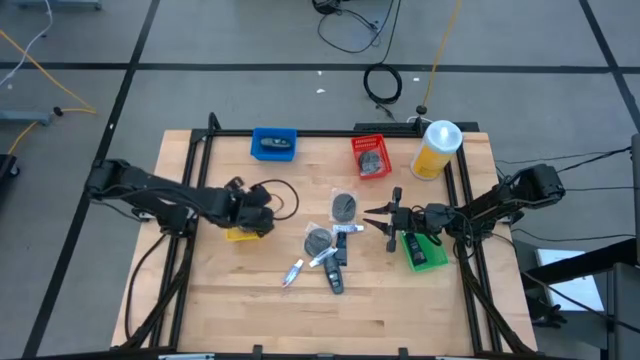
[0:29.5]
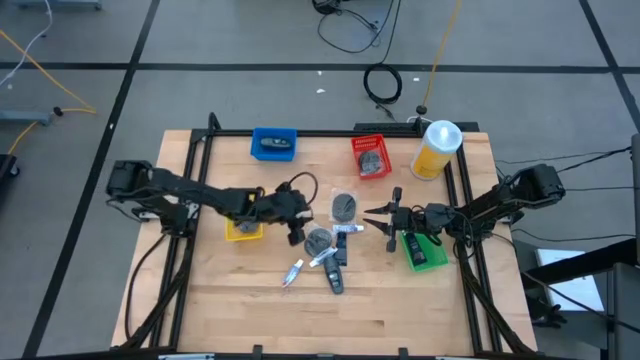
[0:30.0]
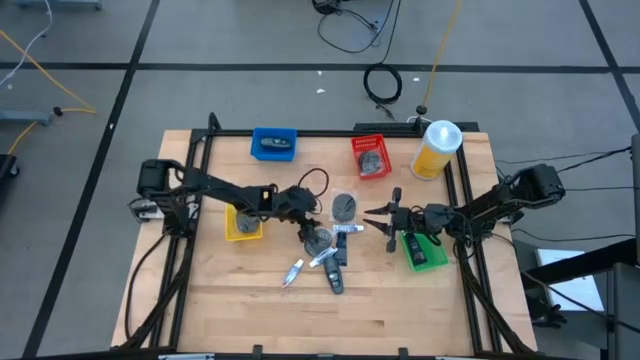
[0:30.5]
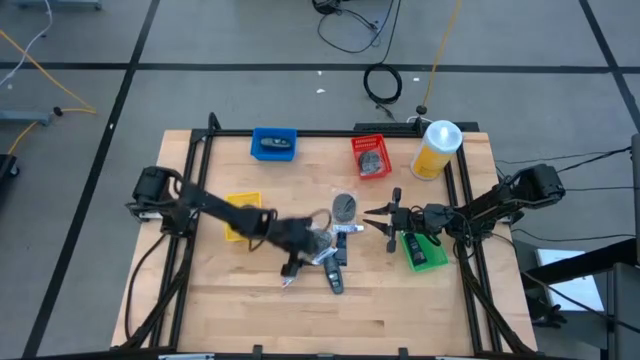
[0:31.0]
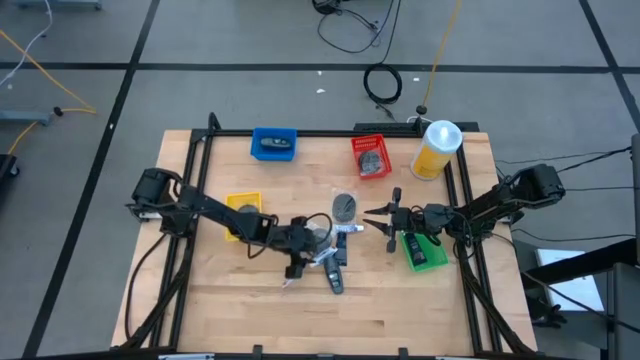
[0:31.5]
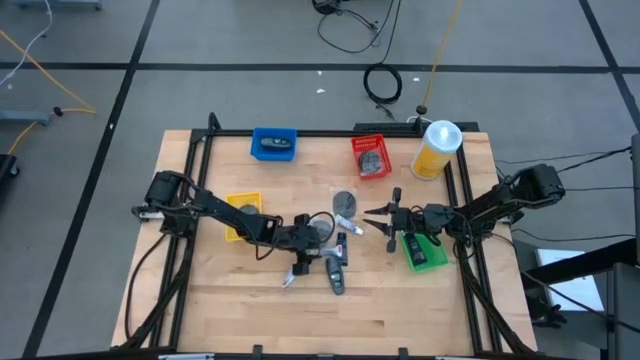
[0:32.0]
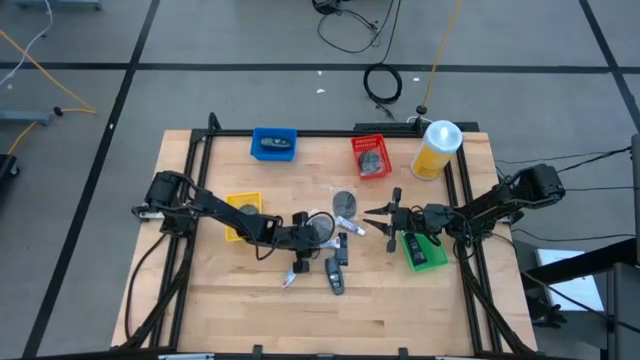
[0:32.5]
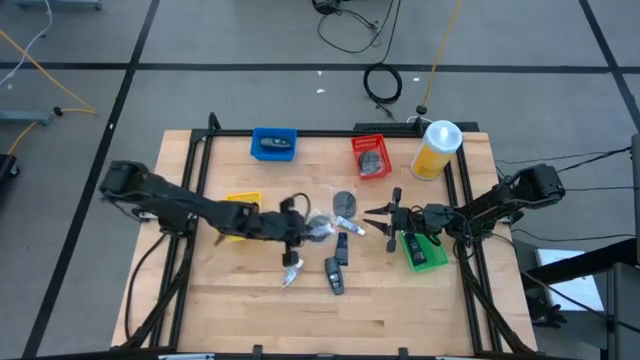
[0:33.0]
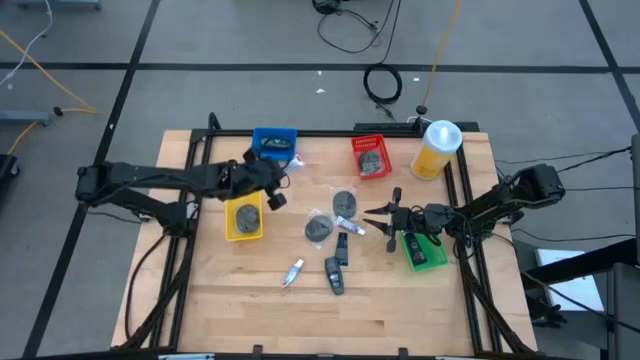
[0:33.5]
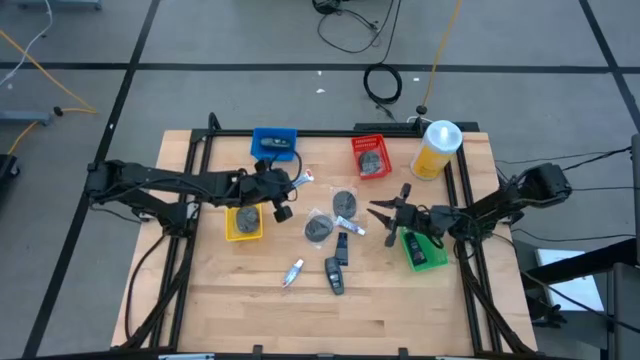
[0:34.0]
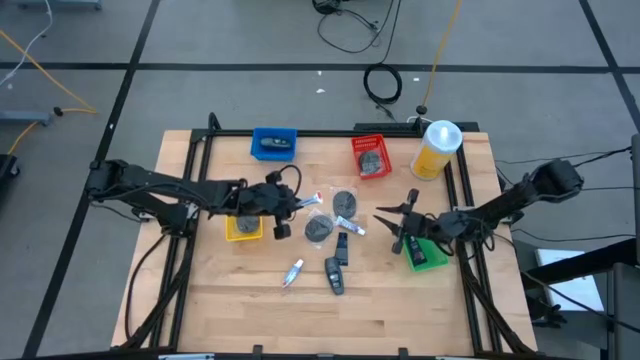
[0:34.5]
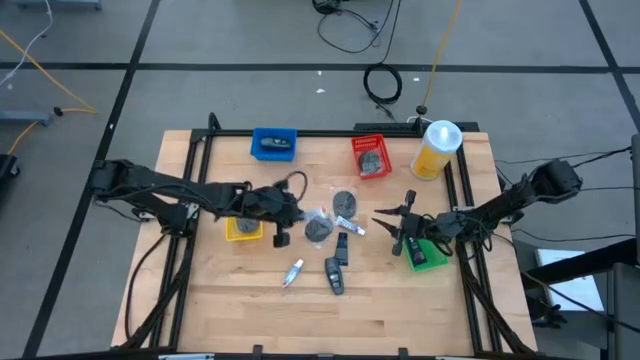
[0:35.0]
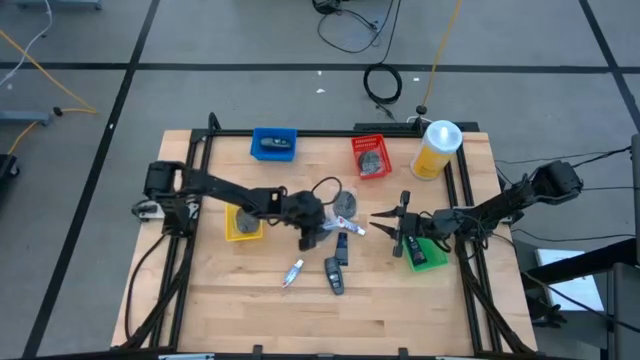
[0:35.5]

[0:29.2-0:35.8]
Task: Pick & Place Travel size toiletries
Put the white toothpaste into the red bin

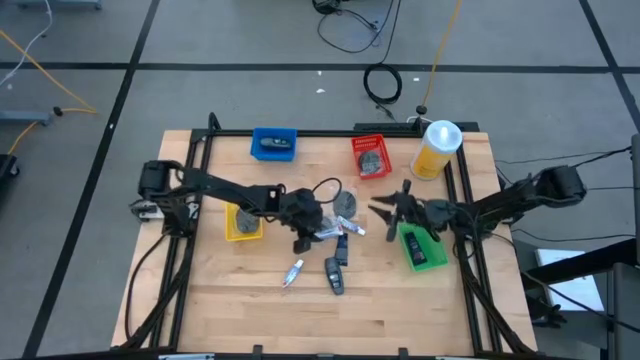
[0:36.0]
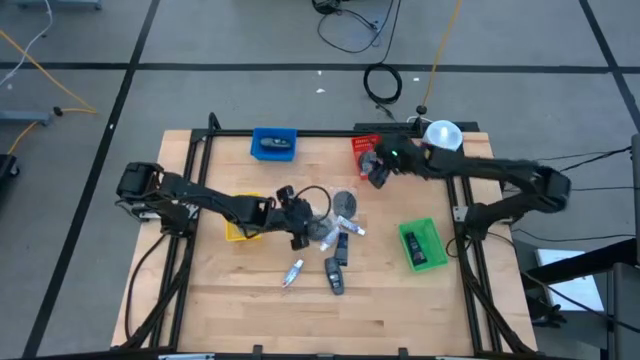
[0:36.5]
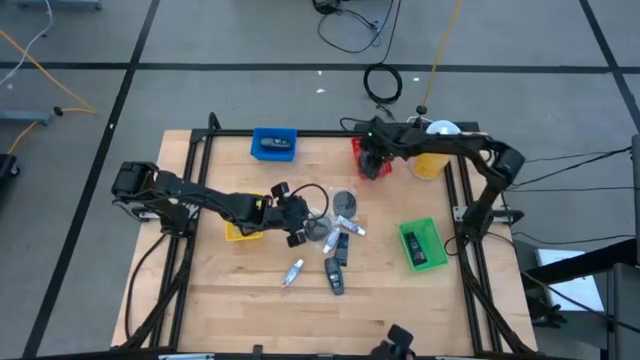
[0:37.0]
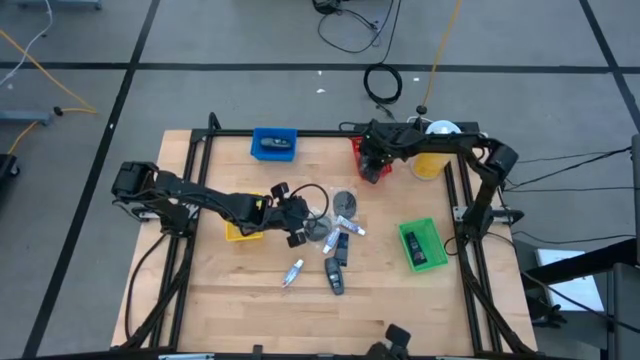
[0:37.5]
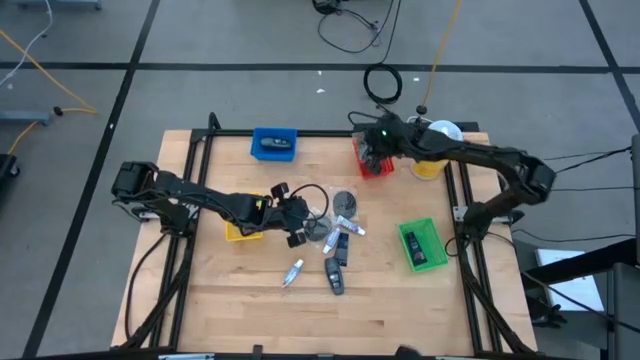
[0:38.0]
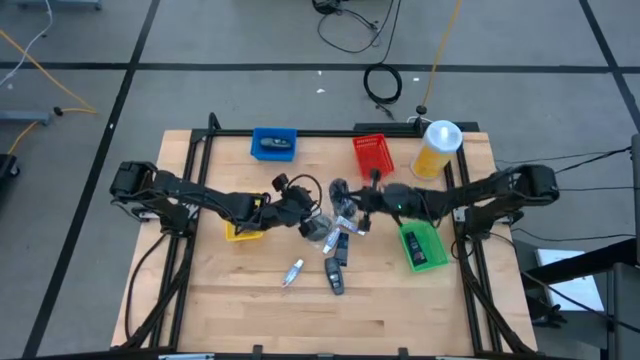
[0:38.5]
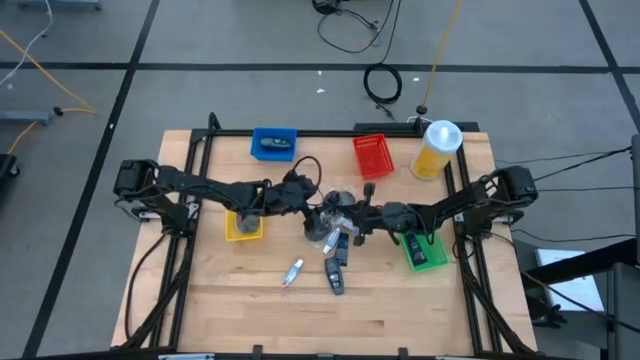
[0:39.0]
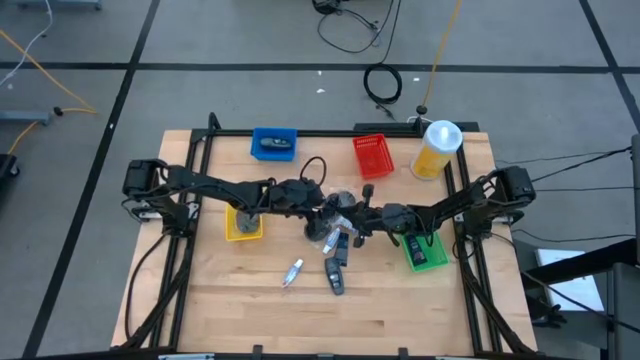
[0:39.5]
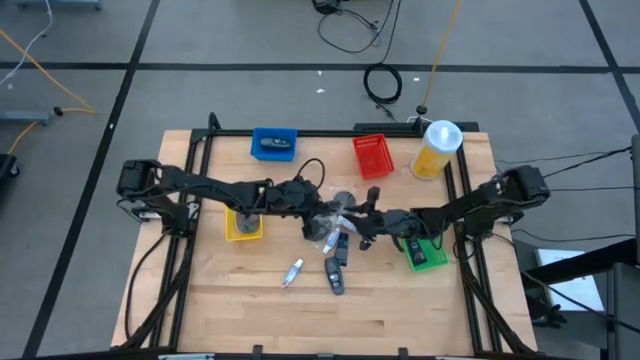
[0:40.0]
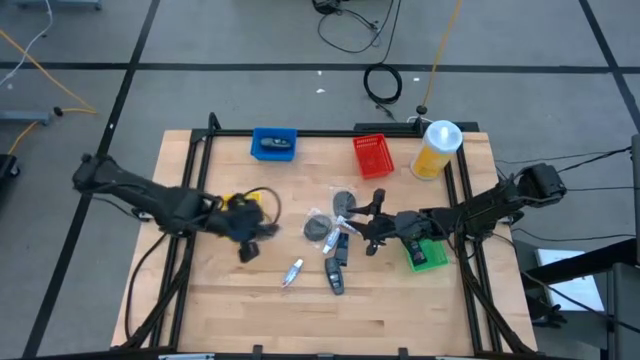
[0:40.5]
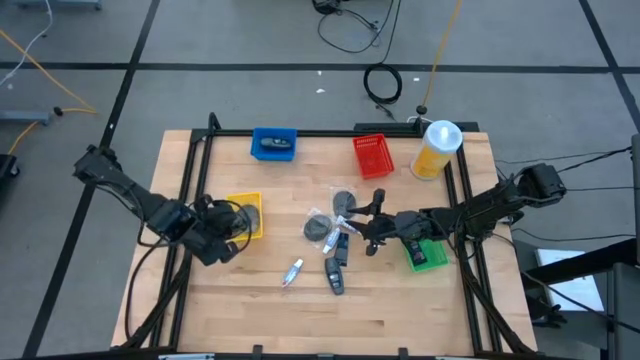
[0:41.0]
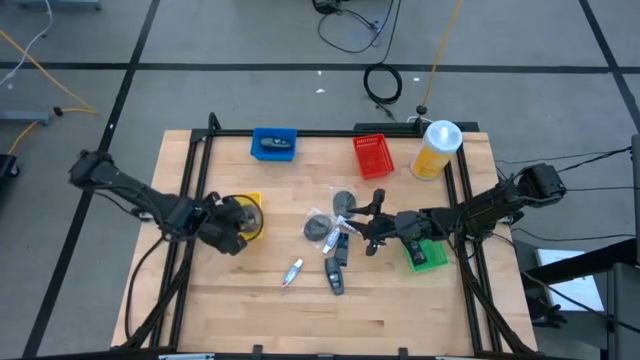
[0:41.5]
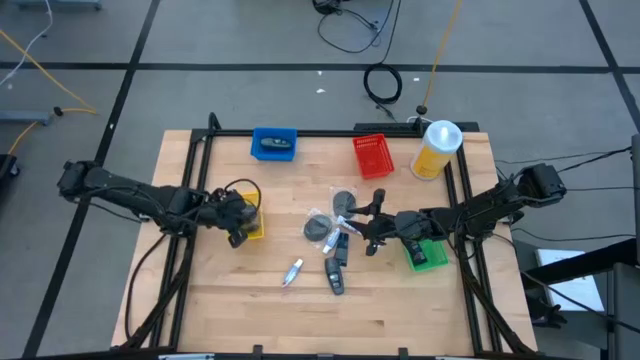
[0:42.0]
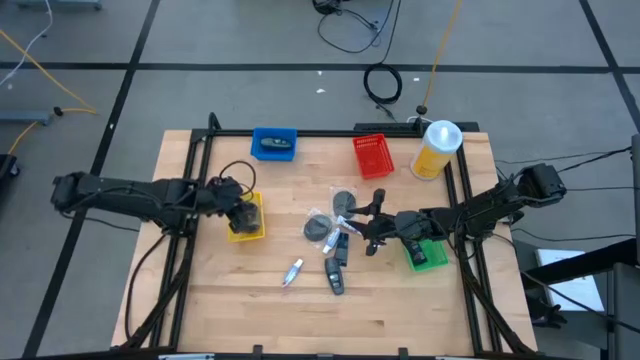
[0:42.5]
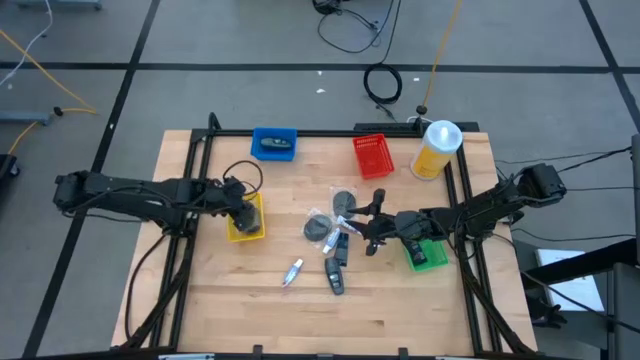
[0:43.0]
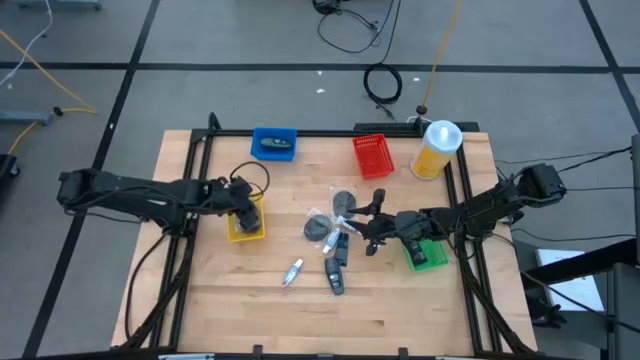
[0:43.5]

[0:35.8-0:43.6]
Put the black hairbrush into the yellow bin

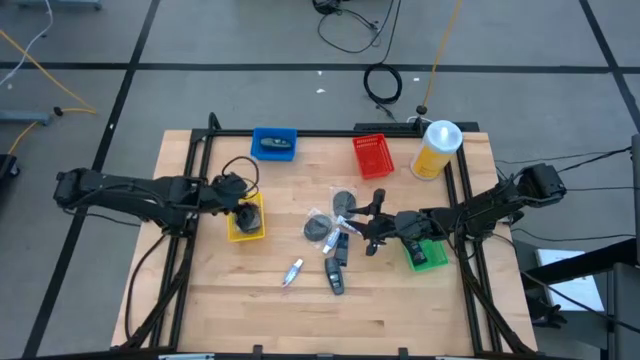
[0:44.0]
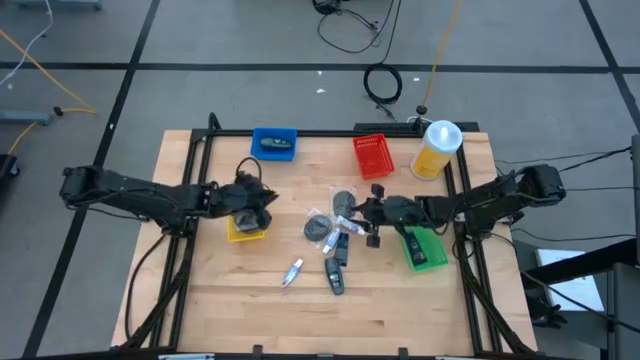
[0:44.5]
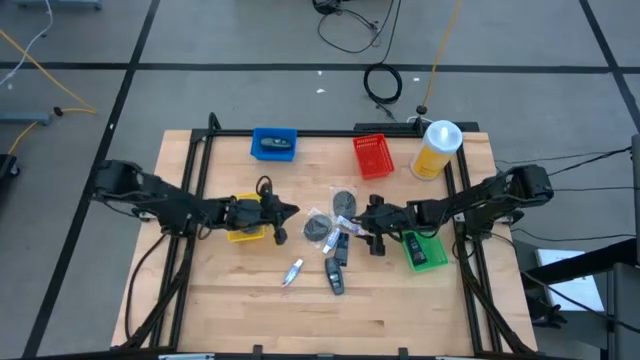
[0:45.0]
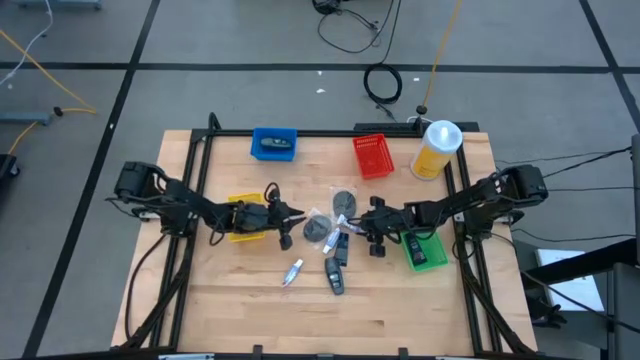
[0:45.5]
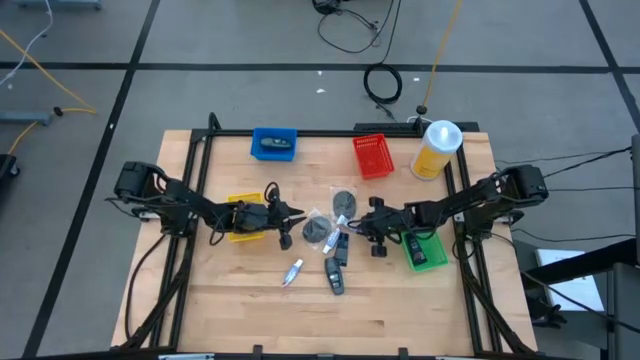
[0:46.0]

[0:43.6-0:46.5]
Put the white toothpaste into the red bin

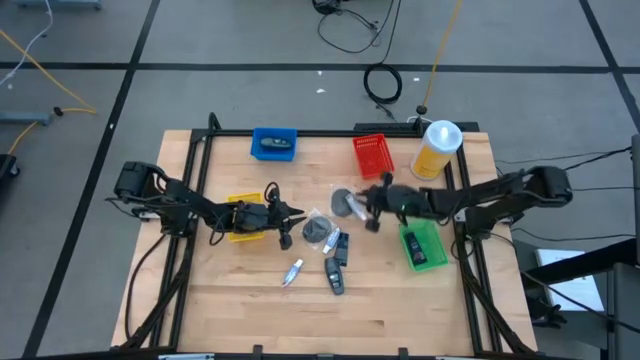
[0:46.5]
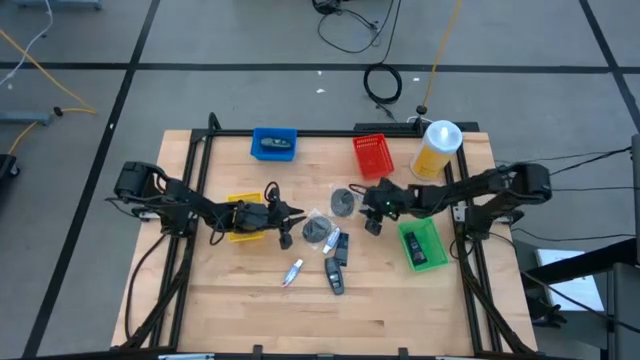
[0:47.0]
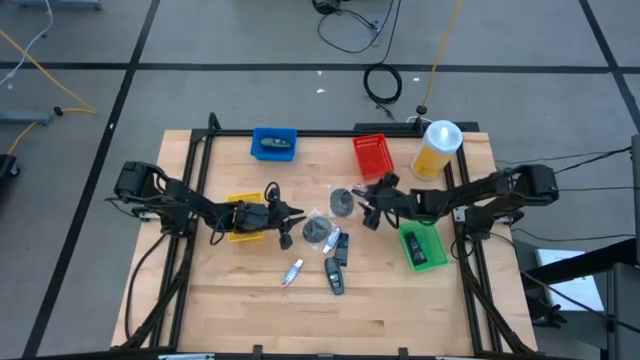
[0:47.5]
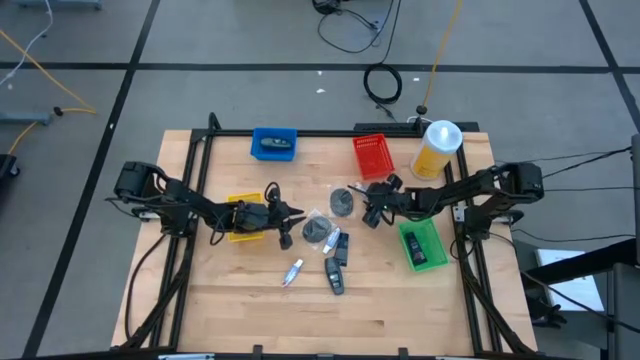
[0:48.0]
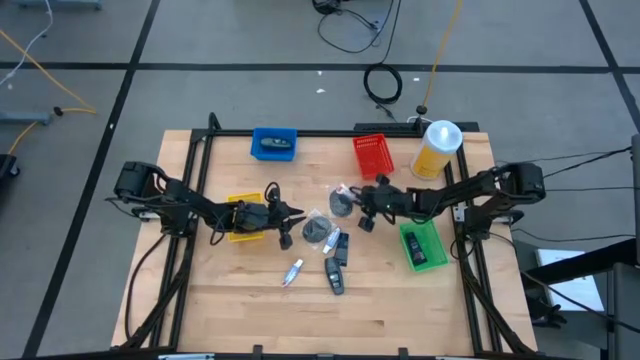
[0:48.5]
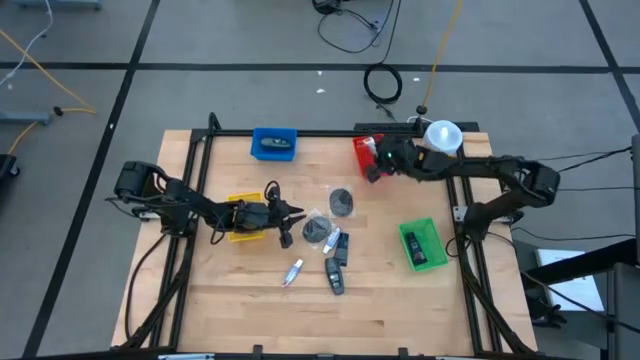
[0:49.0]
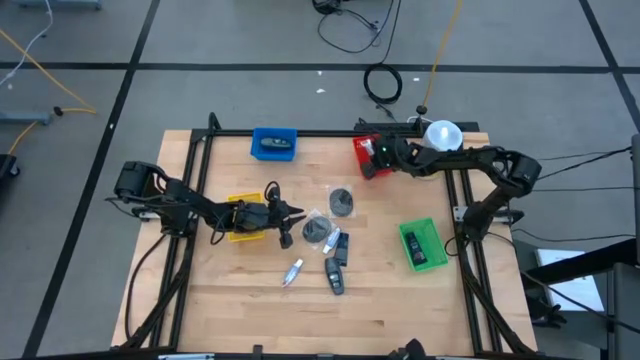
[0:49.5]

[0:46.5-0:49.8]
Put the white toothpaste into the red bin
